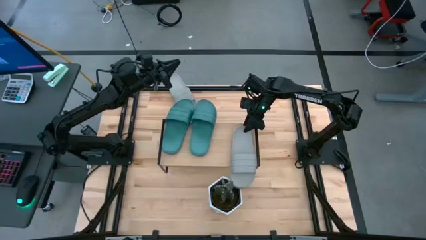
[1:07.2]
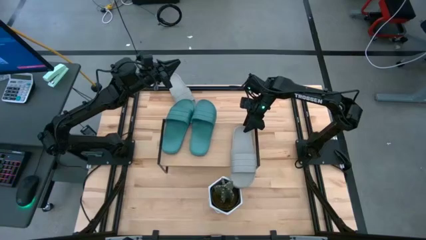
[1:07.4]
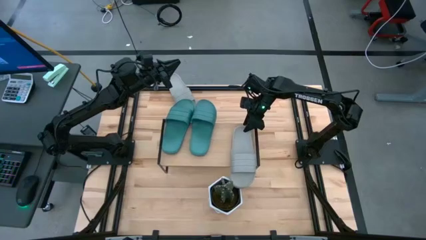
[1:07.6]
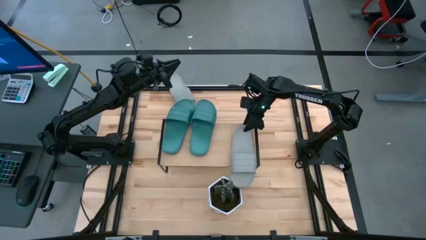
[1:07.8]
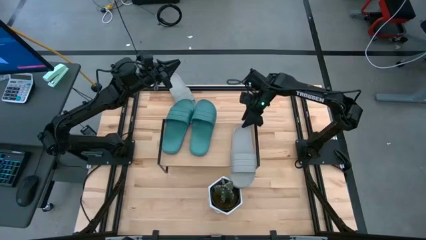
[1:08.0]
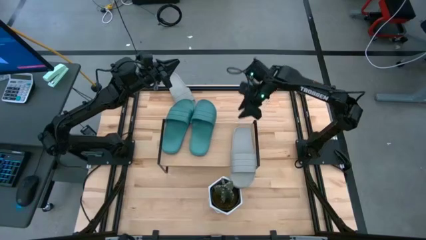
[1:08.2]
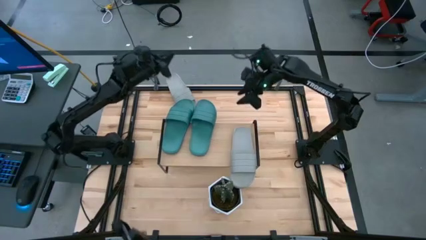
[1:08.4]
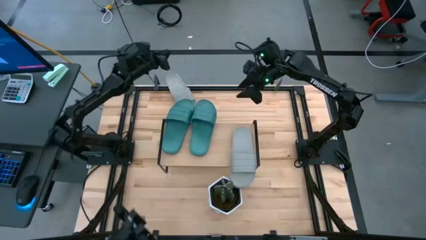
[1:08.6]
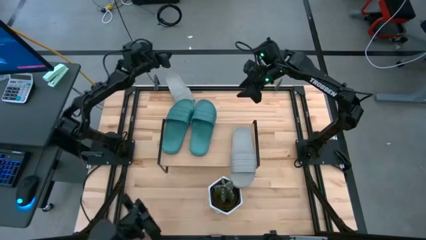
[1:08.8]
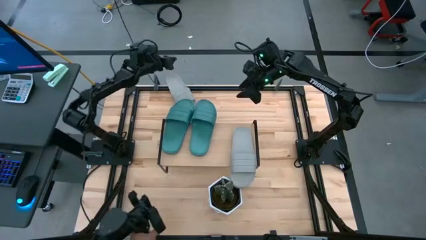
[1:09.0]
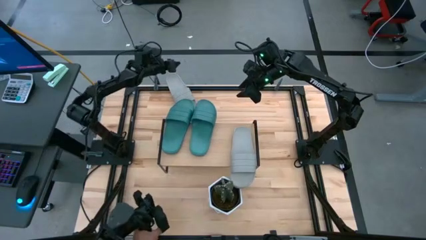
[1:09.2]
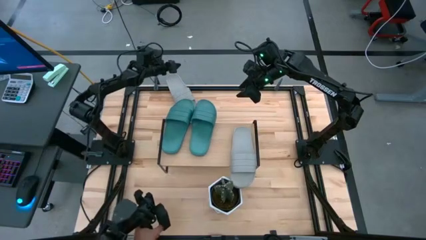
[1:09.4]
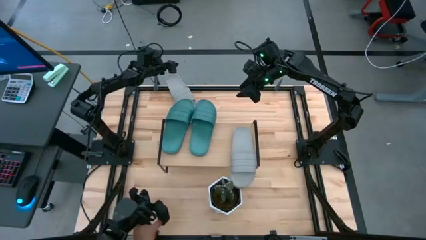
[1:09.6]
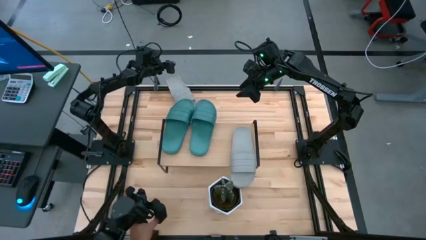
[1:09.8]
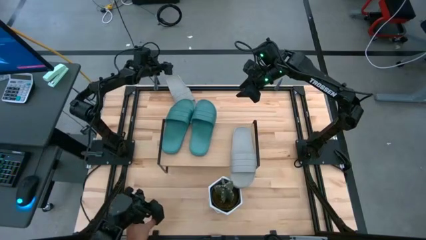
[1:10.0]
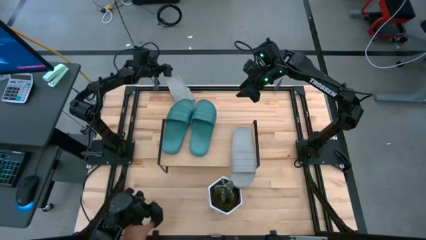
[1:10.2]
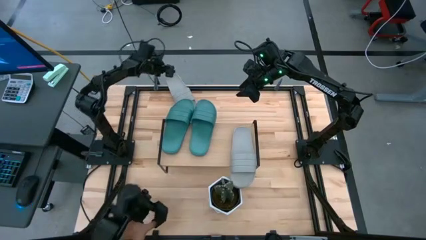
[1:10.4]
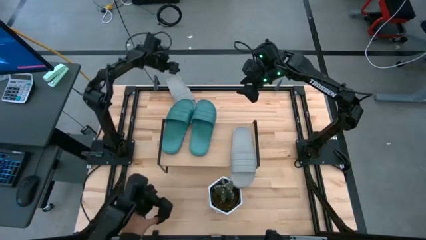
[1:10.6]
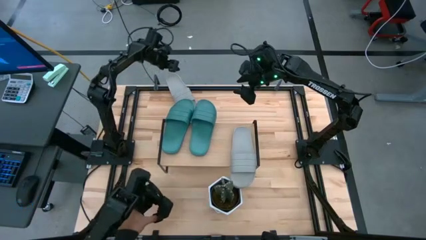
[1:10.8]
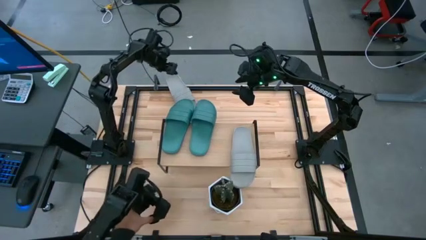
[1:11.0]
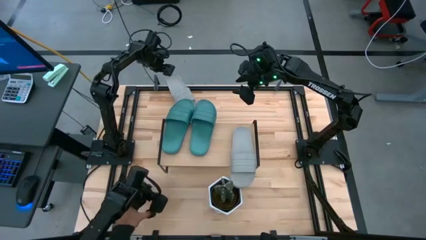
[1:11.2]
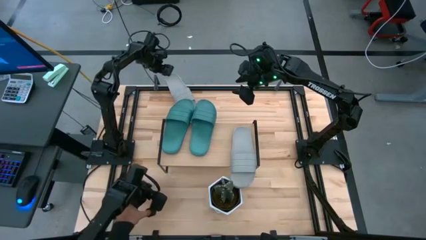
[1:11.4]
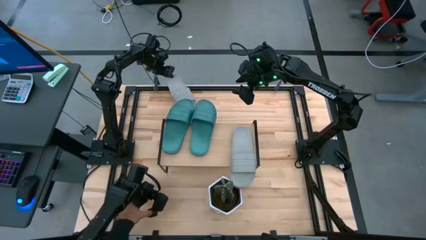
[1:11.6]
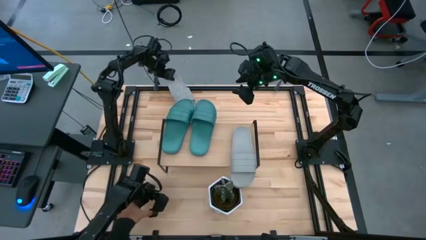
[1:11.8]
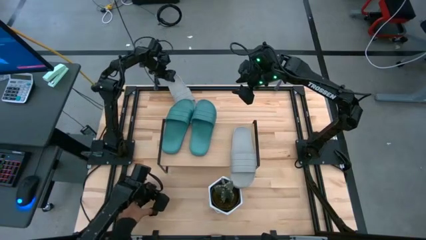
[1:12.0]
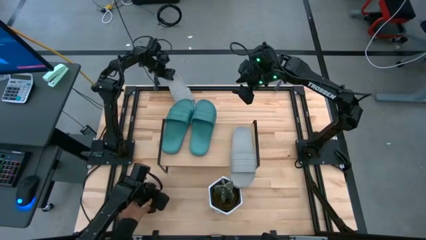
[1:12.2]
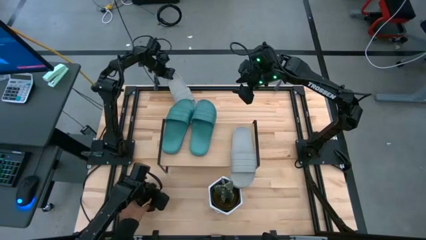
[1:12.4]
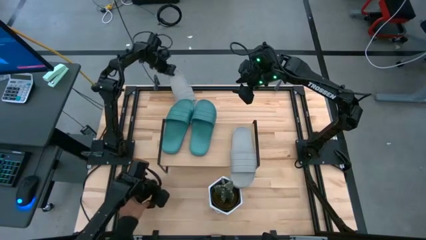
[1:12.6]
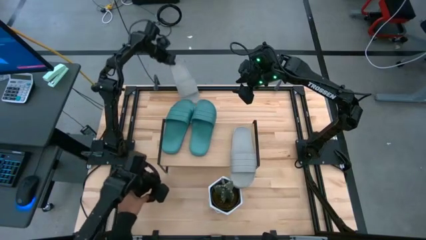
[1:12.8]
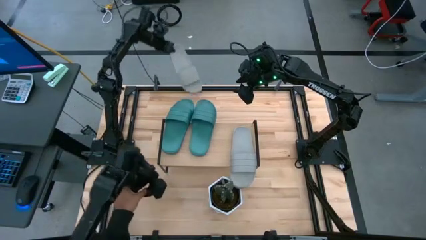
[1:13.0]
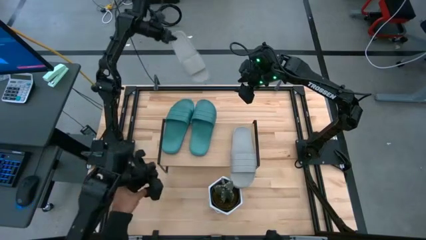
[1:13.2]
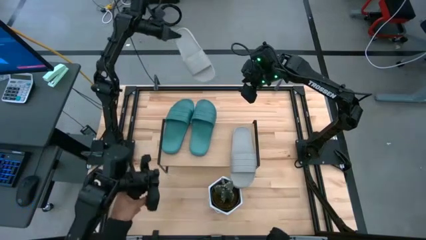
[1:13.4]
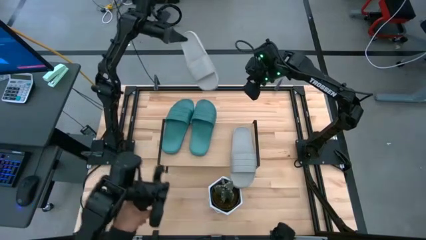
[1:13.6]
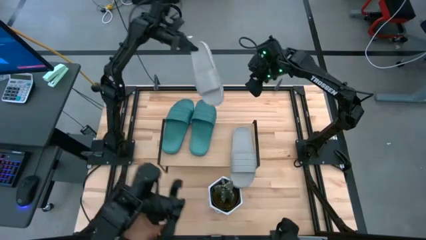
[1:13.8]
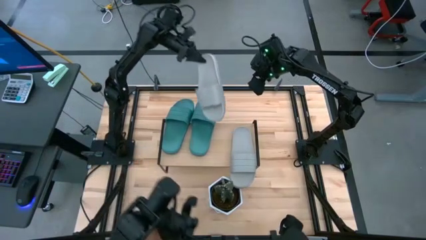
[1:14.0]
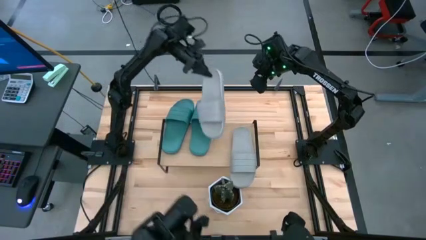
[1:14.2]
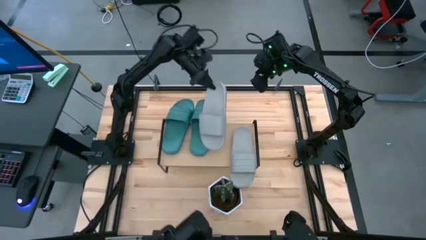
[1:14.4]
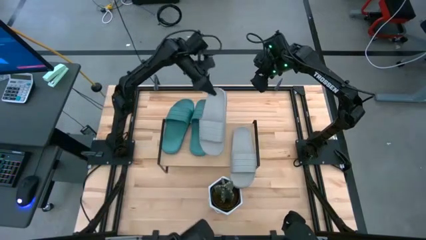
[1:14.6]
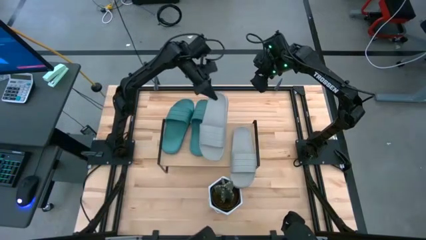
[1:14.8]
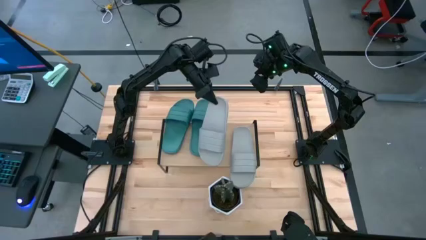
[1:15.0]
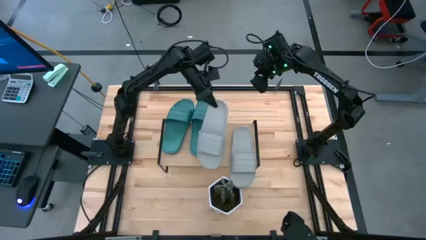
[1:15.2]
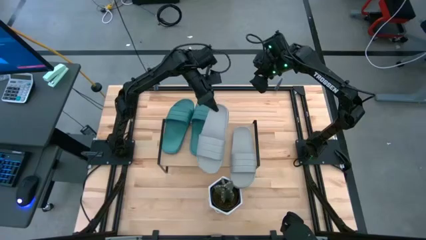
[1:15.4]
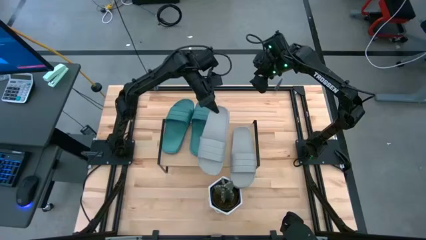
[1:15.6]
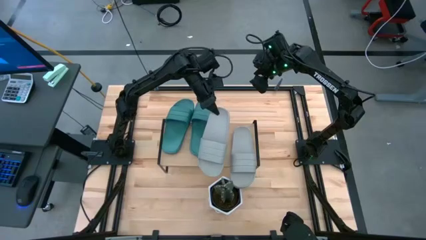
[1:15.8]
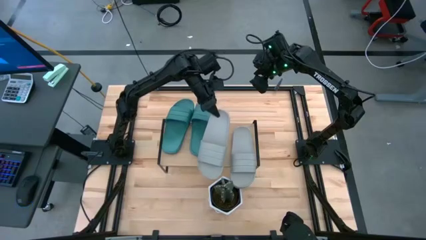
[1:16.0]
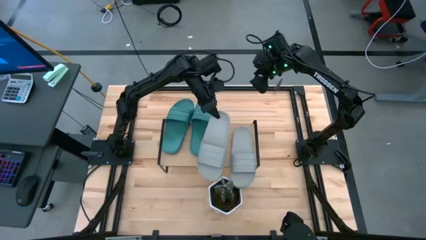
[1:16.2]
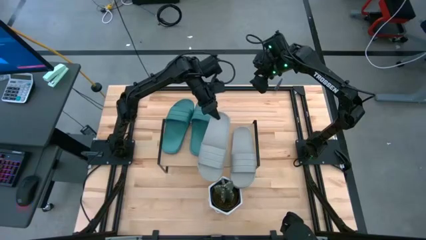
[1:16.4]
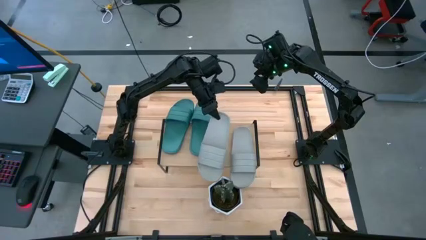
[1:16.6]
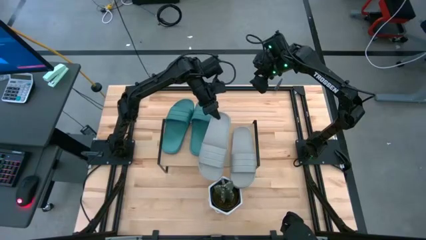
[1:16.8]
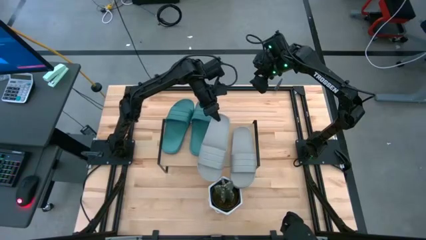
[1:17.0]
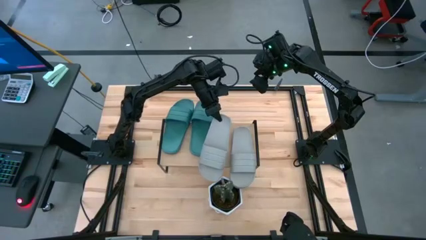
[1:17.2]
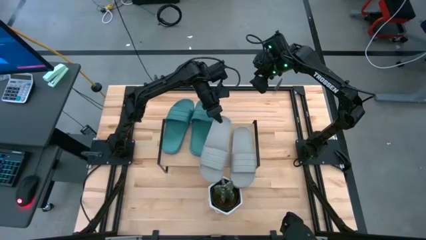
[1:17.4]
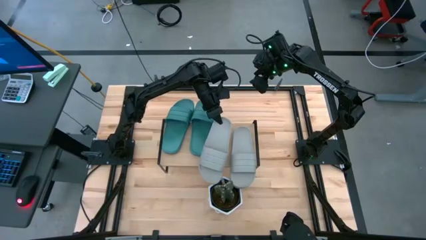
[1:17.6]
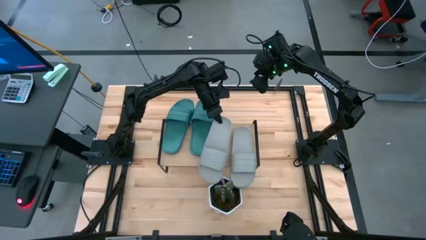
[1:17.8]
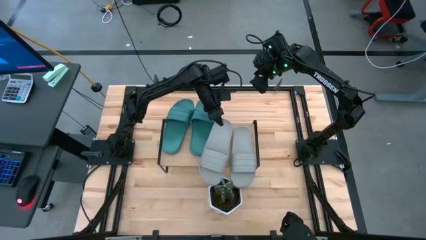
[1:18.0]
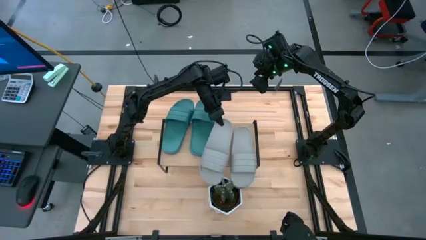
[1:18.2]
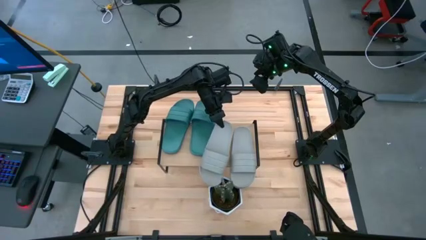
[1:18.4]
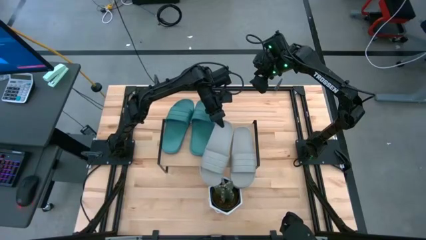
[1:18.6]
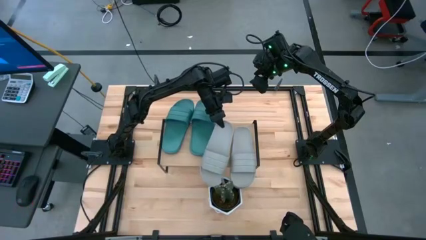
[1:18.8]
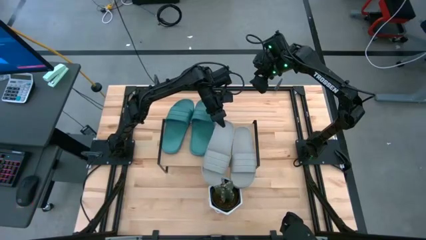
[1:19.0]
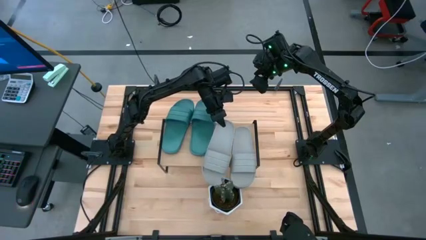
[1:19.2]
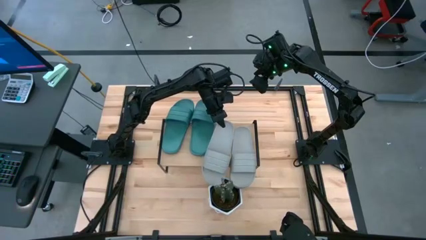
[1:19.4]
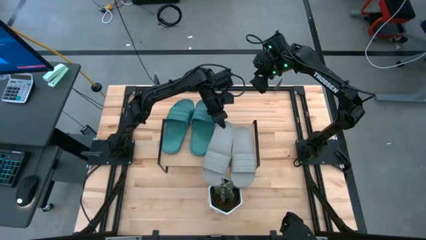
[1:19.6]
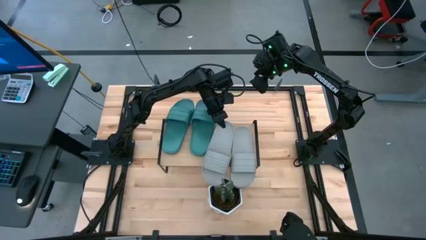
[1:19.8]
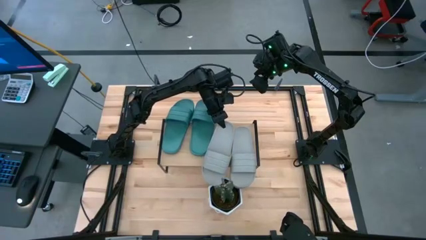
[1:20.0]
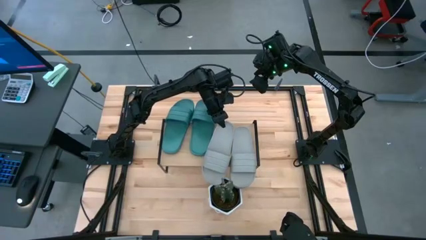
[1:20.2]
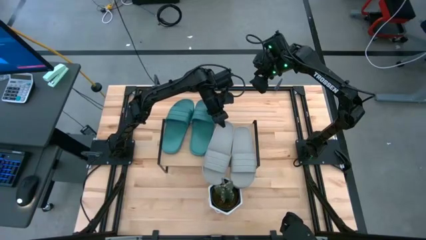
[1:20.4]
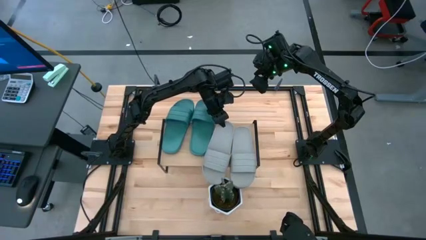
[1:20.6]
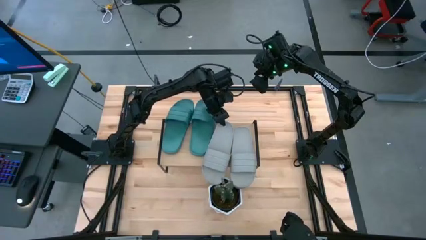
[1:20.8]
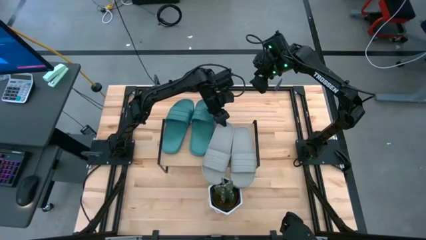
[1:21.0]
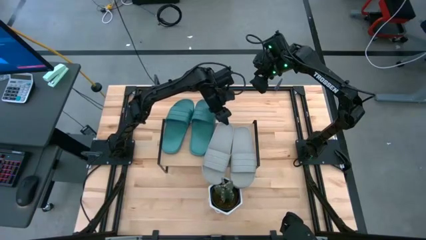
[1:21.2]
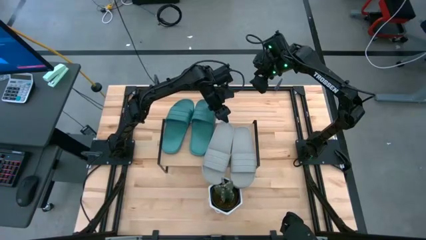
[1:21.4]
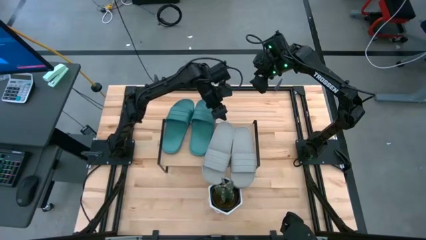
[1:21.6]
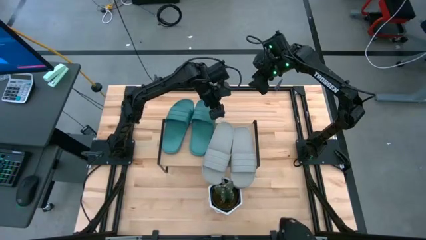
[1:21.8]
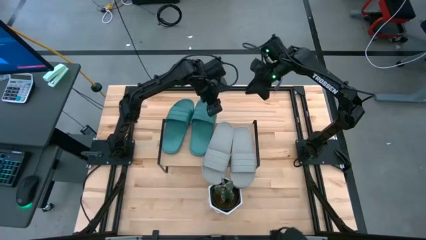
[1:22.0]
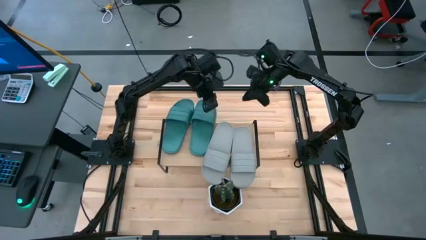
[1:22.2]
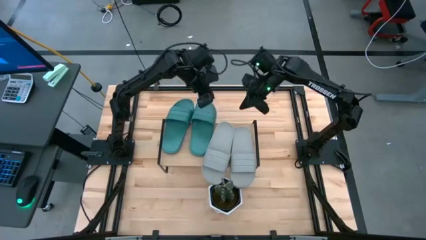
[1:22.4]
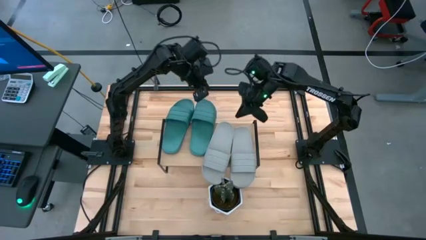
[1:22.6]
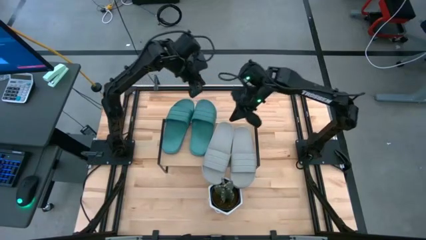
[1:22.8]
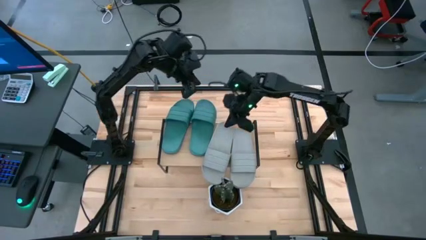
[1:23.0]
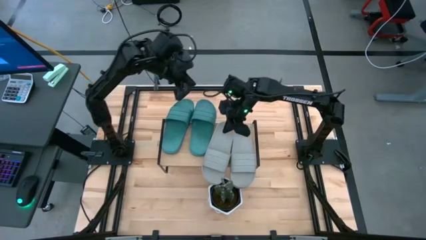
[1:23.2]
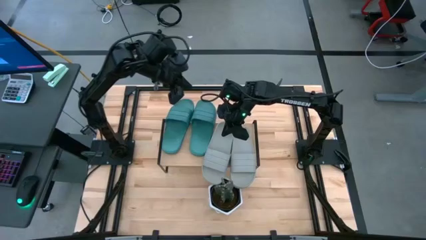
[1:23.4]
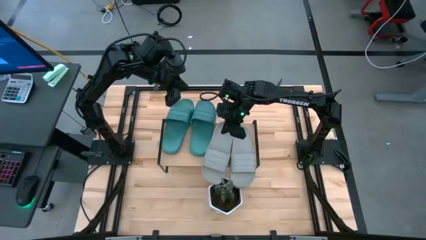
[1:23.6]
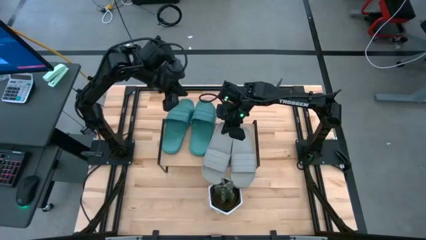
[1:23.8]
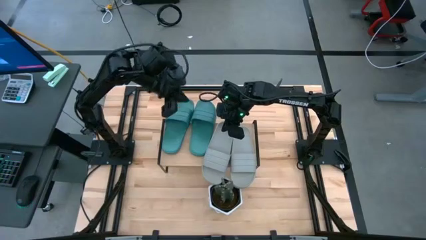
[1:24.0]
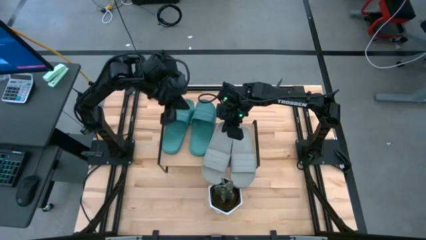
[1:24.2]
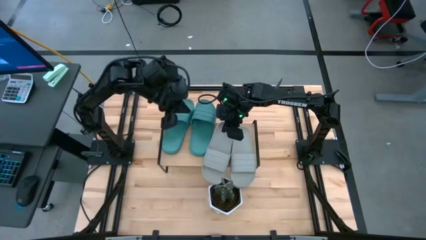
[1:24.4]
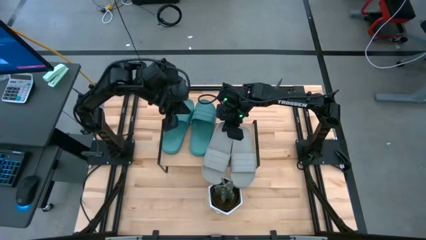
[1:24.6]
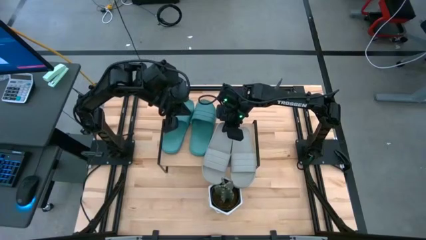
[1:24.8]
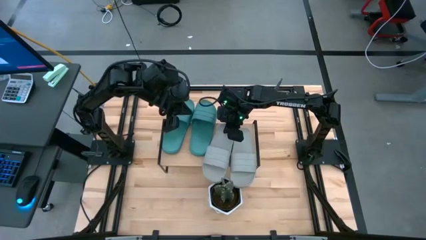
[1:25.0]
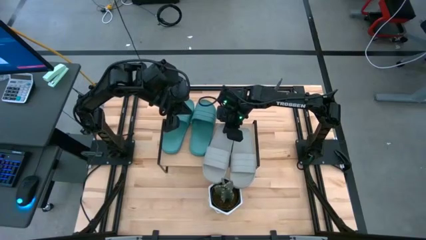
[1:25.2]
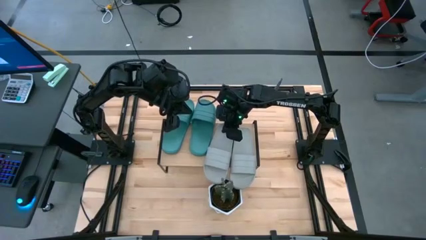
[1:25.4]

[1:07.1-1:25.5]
Task: Pick and place slides into the shelf
Put the gray slipper on the shelf
